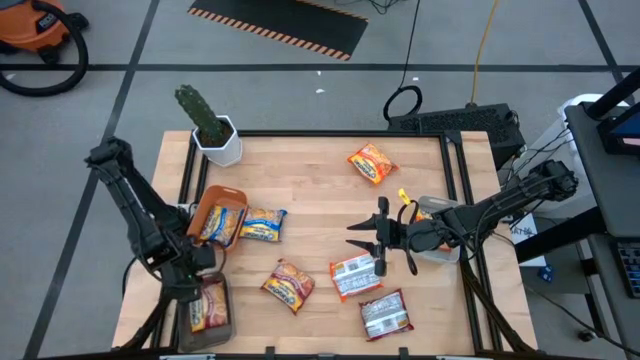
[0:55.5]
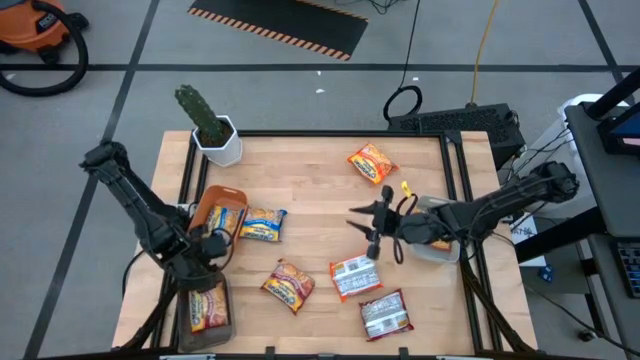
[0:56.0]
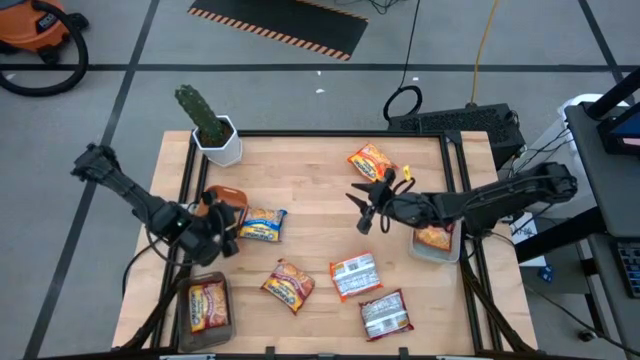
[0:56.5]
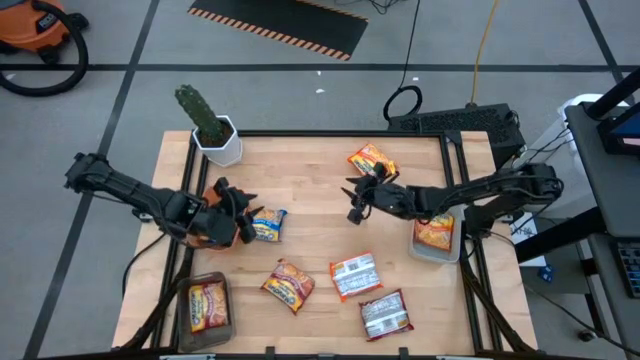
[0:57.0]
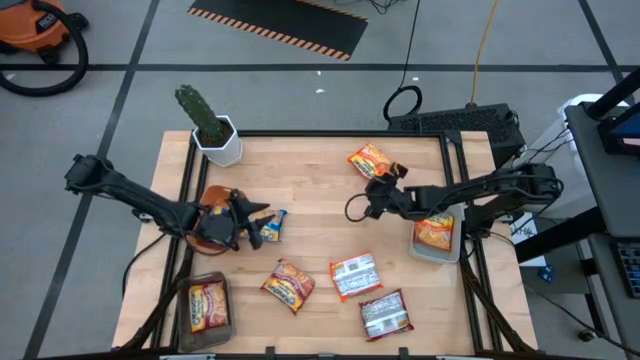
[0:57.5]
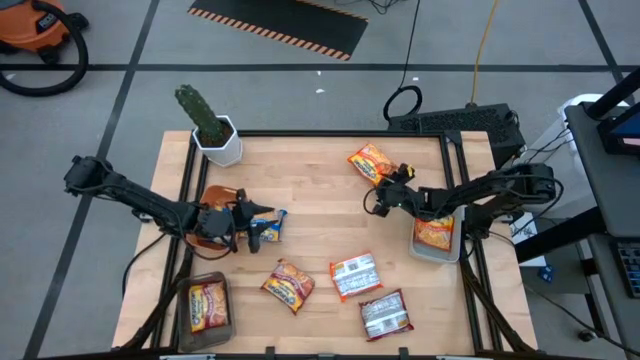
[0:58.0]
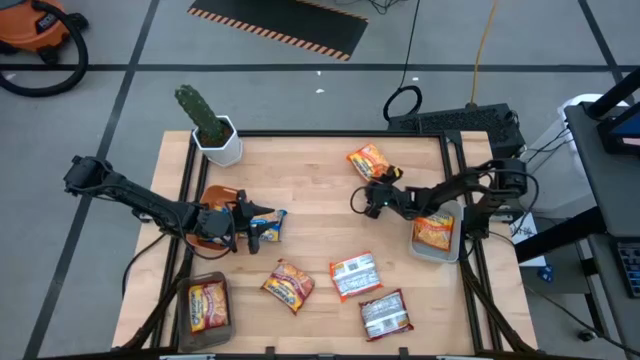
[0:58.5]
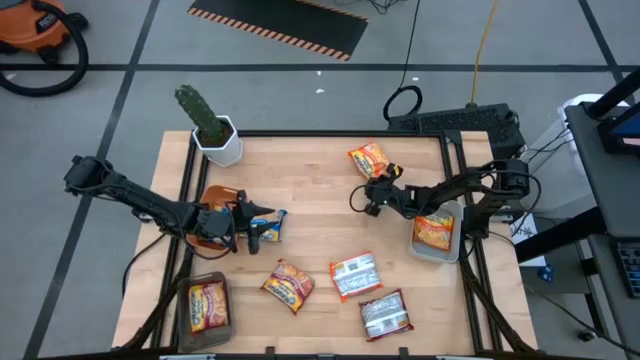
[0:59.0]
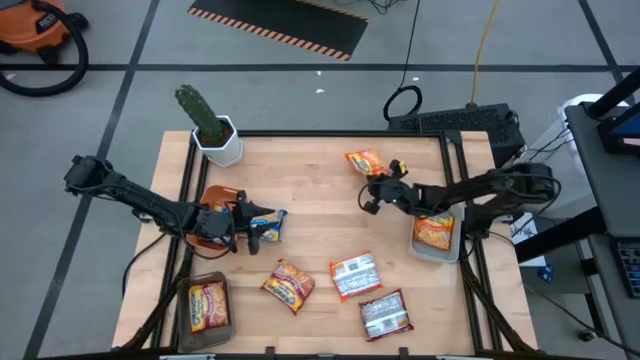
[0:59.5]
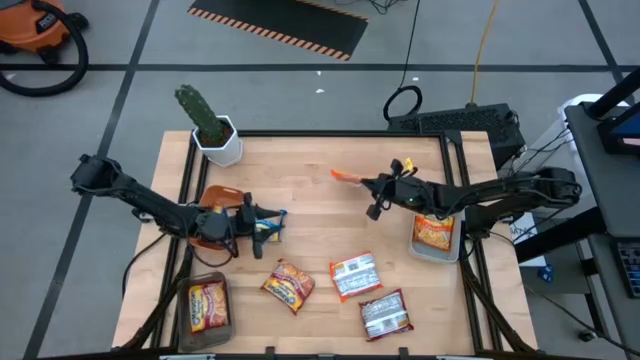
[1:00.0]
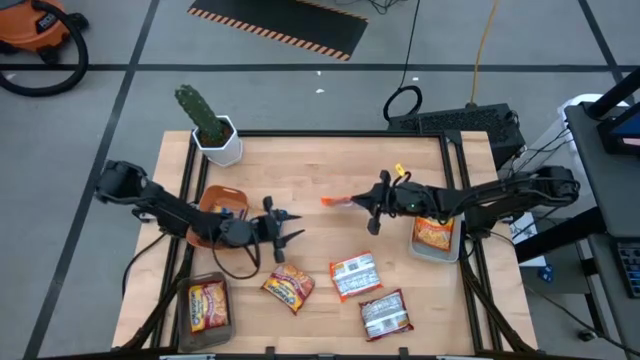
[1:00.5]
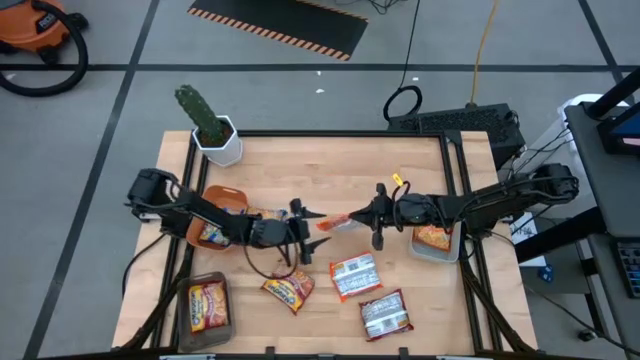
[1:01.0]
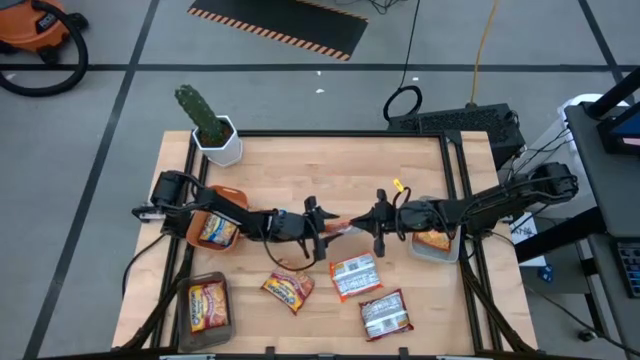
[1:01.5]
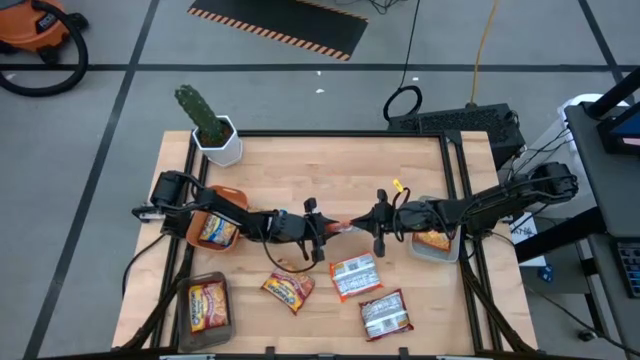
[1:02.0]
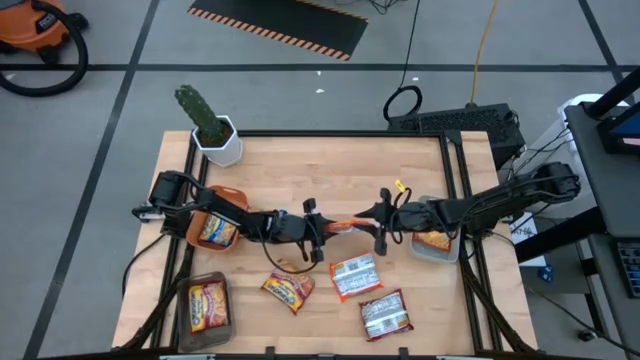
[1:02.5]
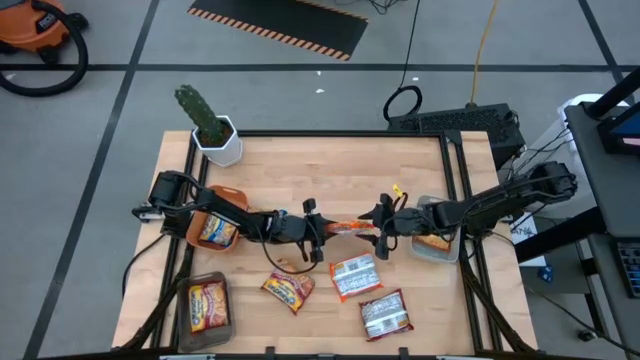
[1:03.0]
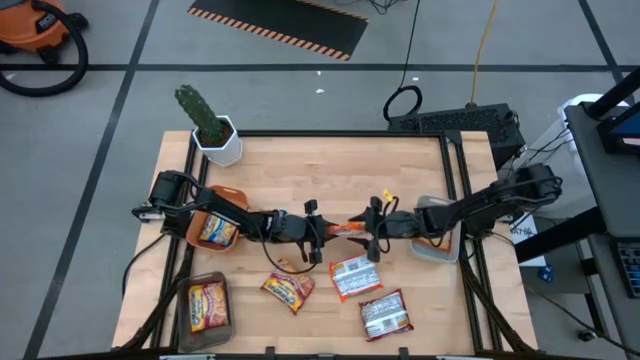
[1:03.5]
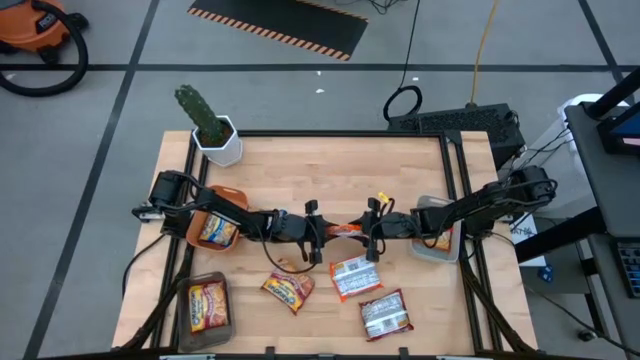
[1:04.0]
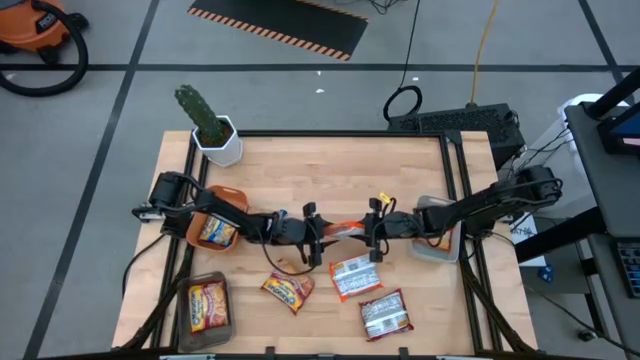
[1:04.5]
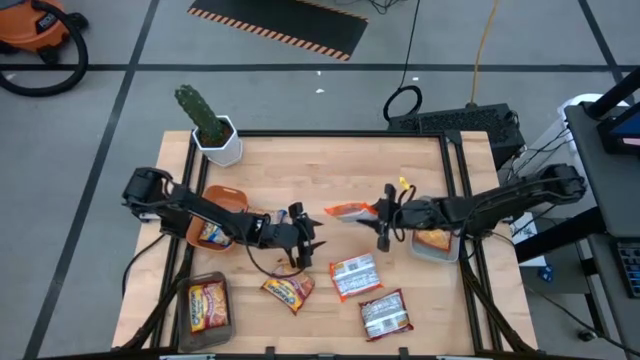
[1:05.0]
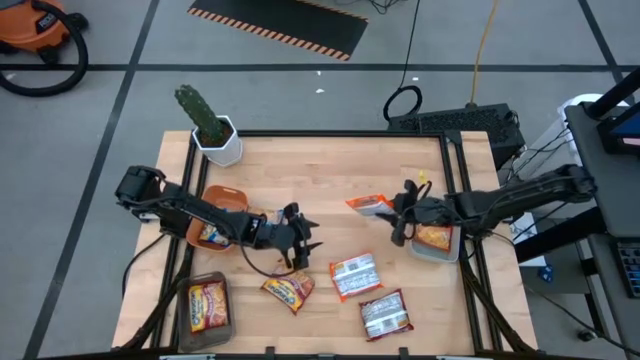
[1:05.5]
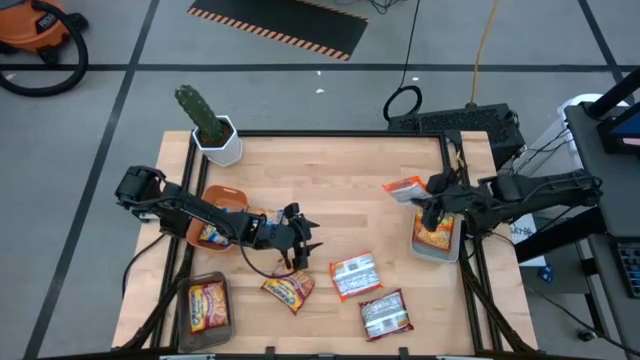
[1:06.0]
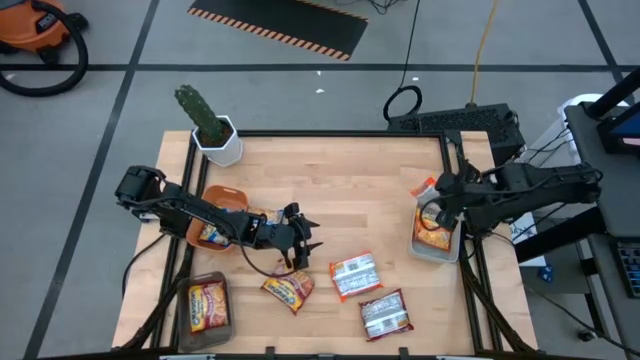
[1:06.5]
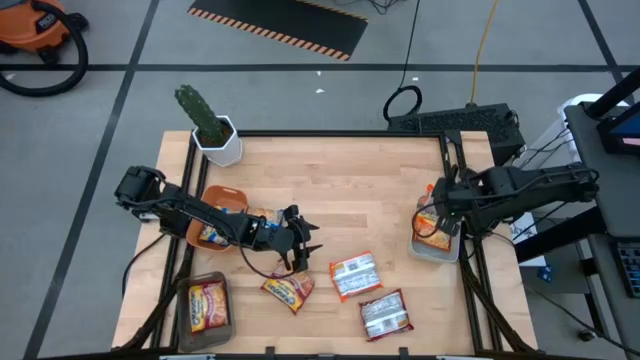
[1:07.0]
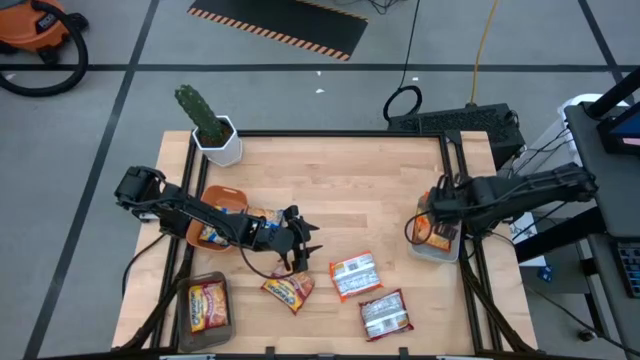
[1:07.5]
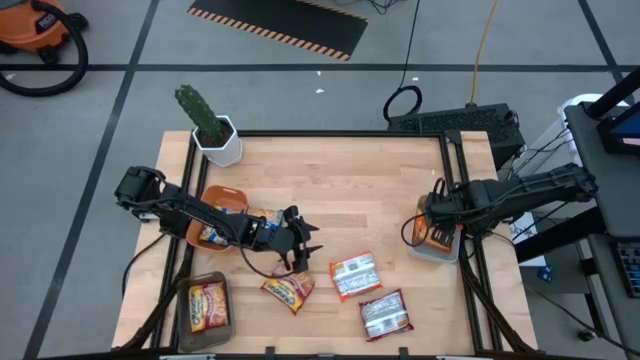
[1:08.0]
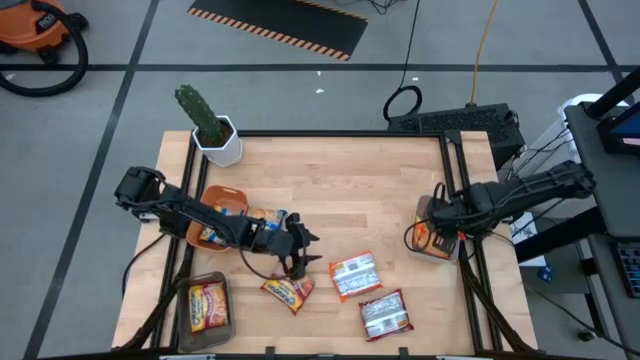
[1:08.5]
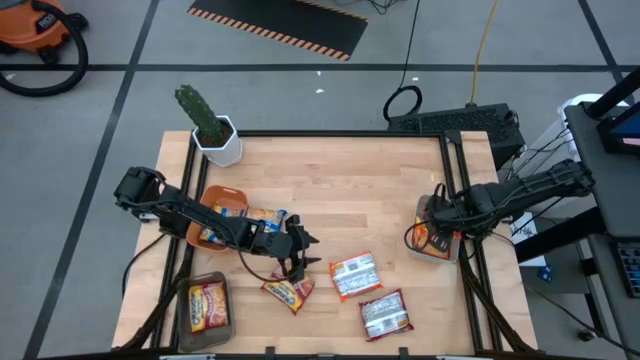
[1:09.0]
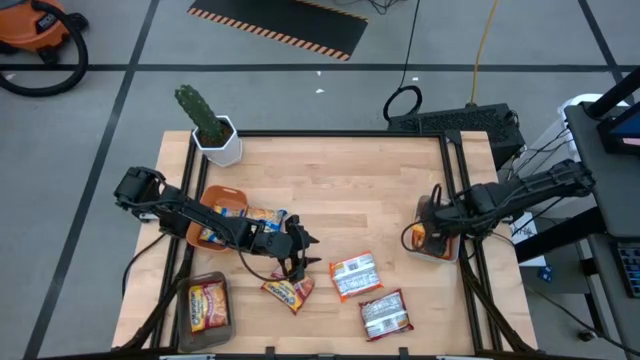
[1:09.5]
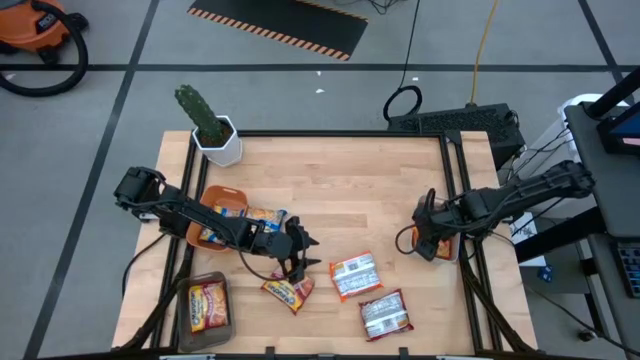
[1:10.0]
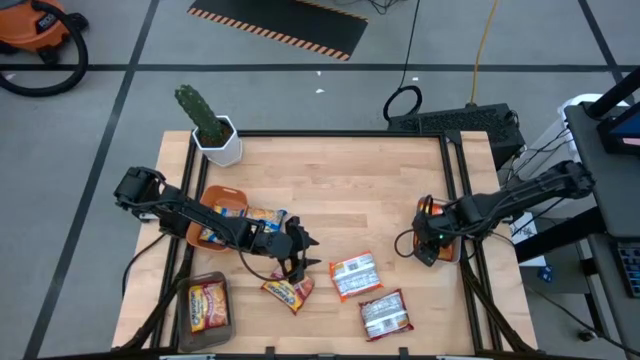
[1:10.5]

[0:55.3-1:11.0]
Task: Sort Maruchan noodles
Put the top orange noodle pack into the white bin

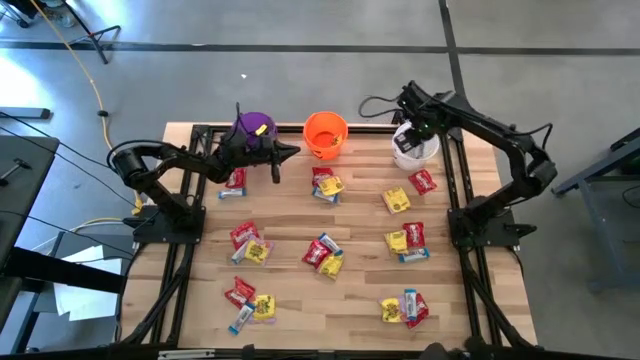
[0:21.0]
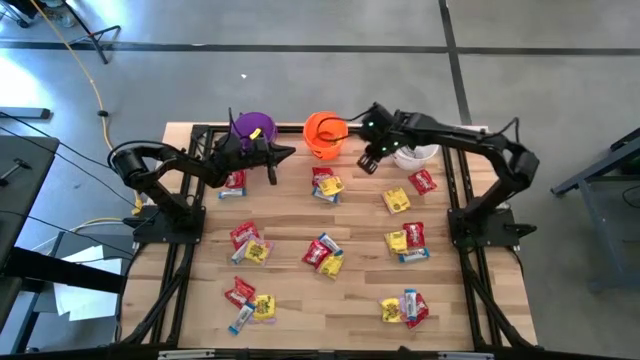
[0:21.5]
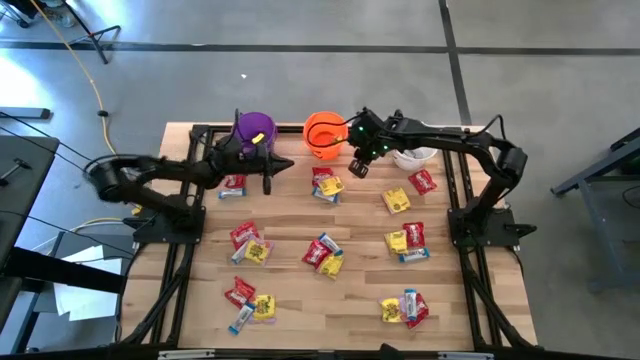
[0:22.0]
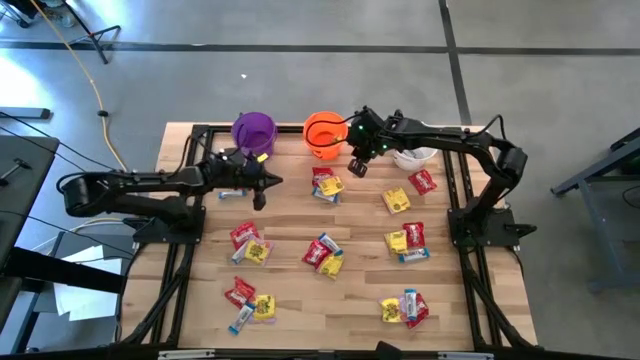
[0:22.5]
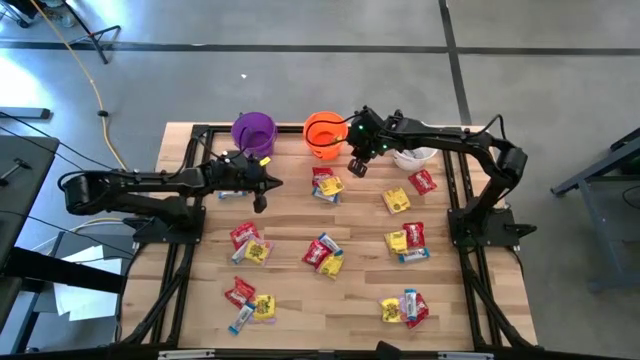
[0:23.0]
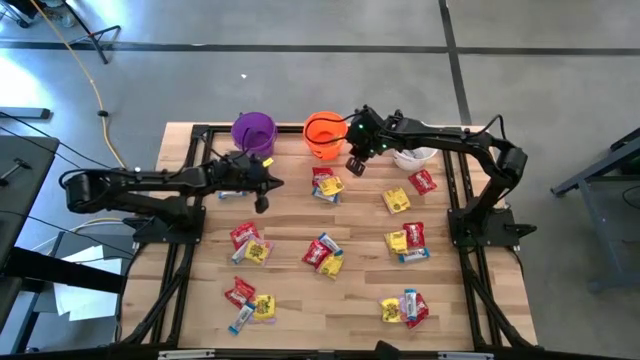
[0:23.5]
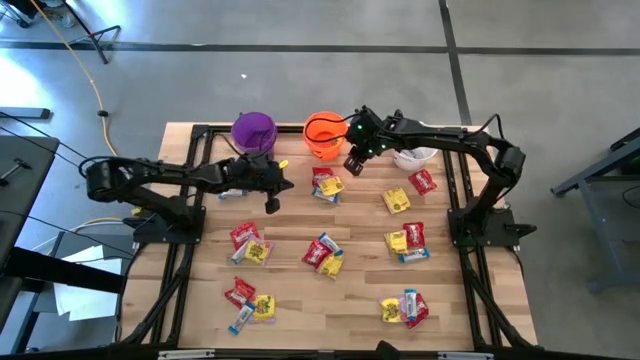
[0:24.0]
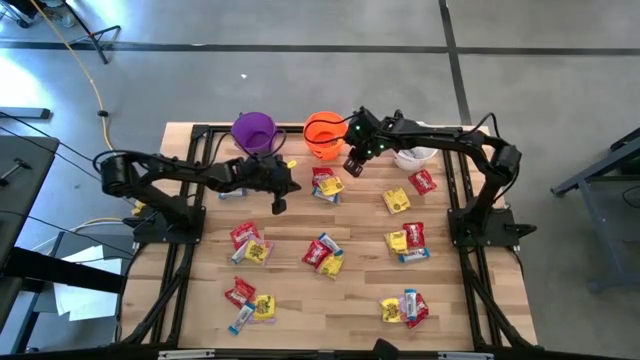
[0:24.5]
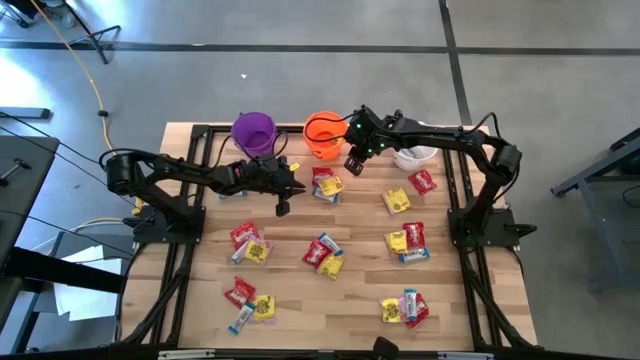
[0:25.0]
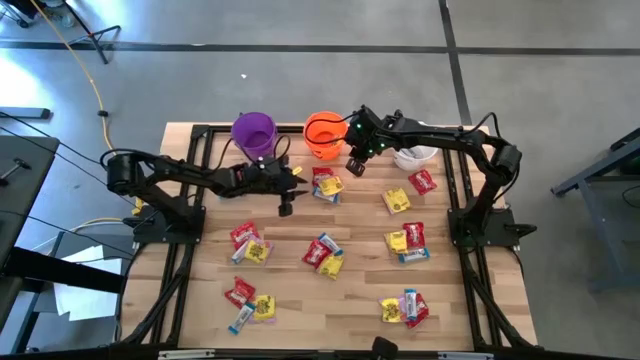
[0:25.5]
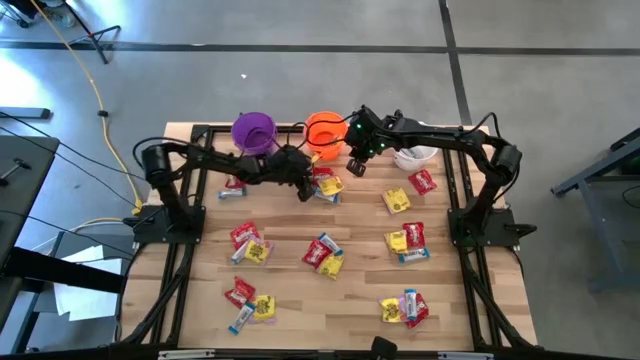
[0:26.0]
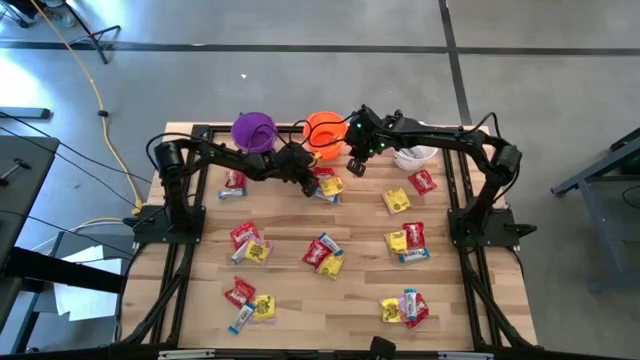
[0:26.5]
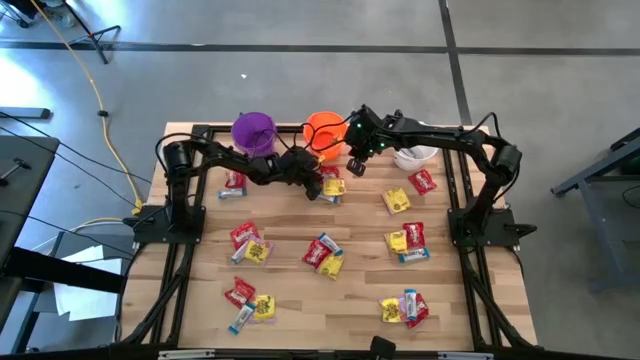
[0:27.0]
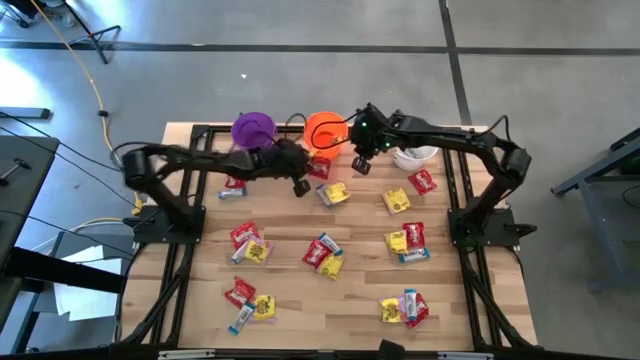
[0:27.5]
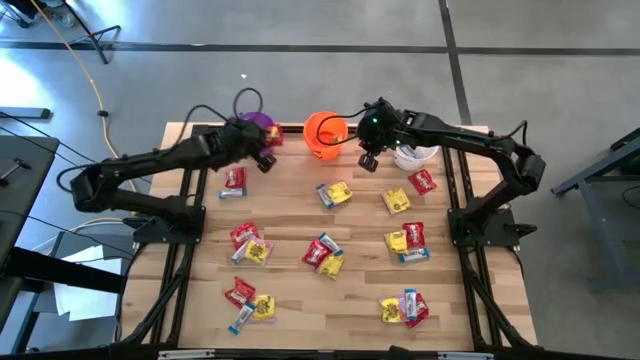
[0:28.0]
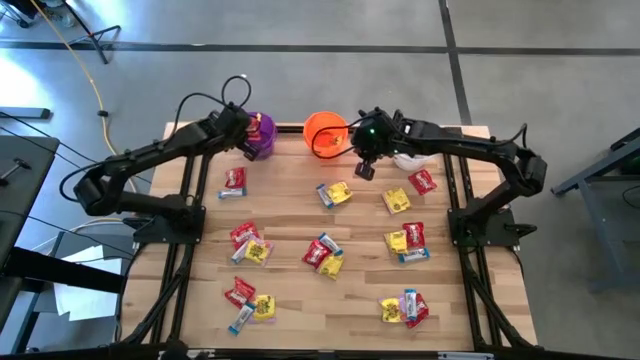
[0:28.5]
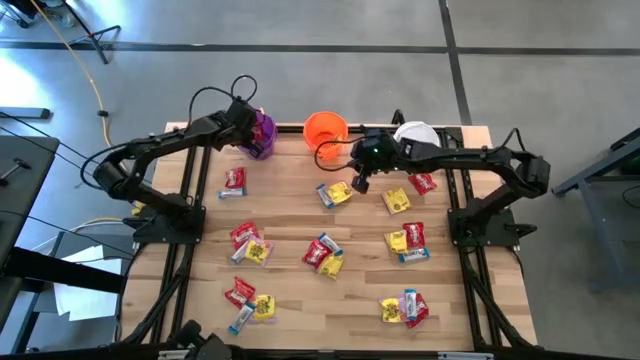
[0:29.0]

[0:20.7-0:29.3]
Task: Sort candy
Put the red candy into the violet bucket
